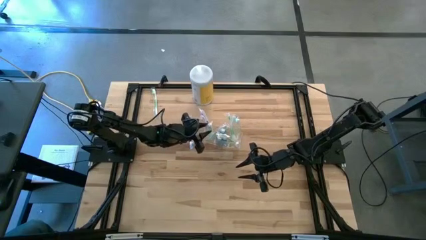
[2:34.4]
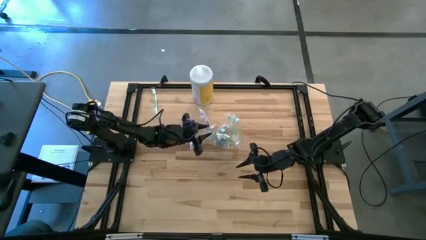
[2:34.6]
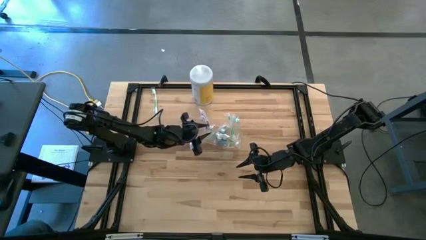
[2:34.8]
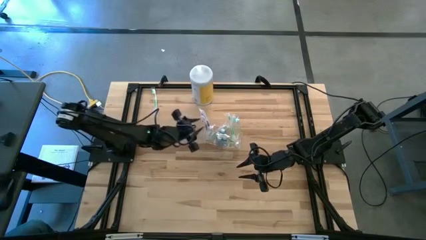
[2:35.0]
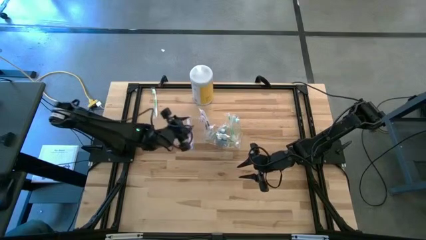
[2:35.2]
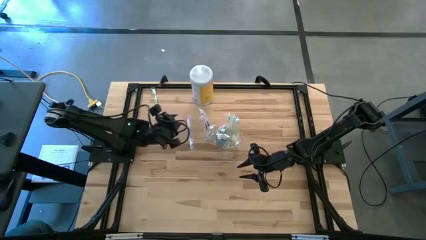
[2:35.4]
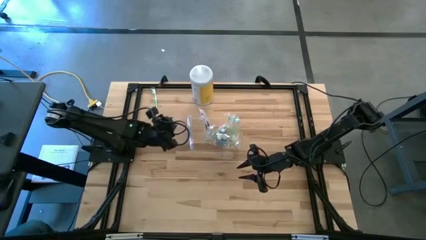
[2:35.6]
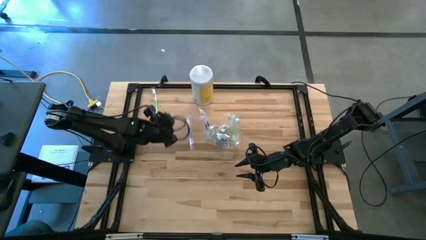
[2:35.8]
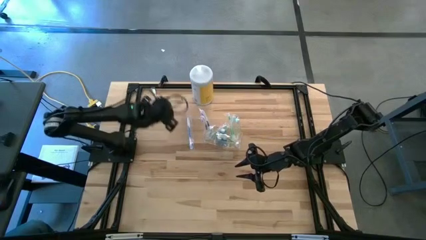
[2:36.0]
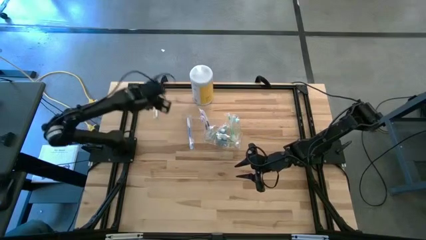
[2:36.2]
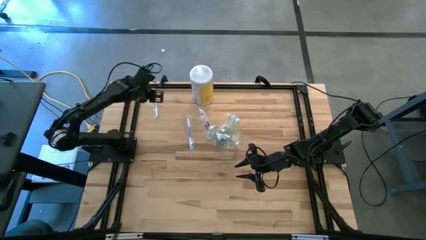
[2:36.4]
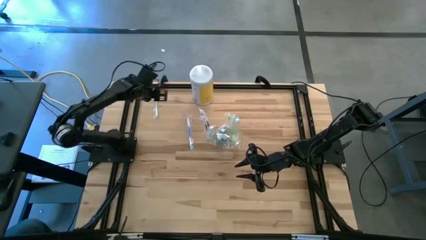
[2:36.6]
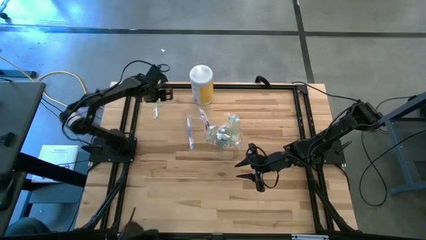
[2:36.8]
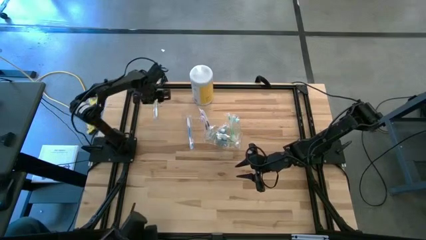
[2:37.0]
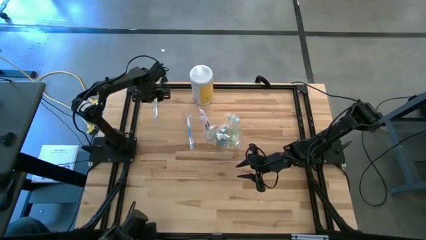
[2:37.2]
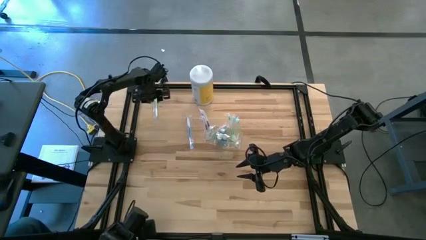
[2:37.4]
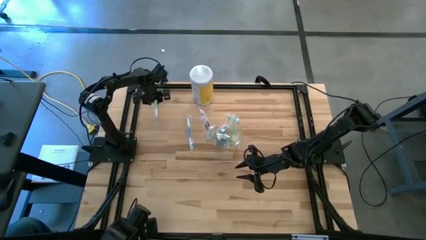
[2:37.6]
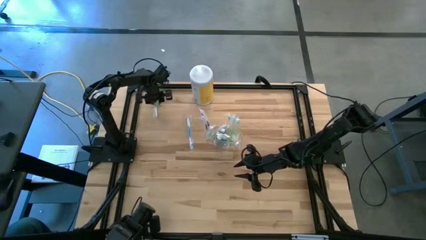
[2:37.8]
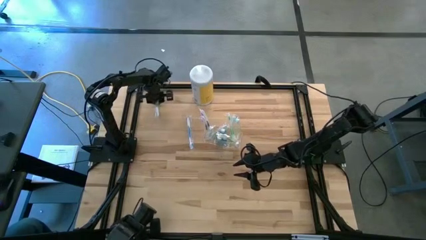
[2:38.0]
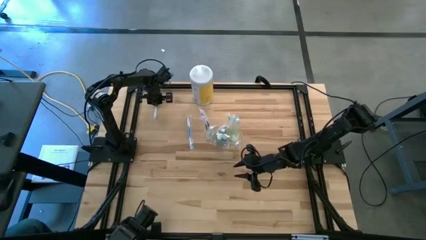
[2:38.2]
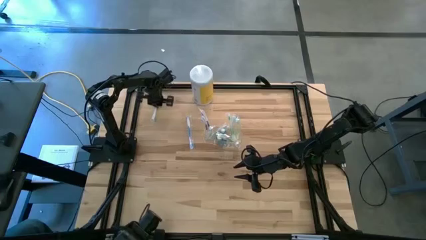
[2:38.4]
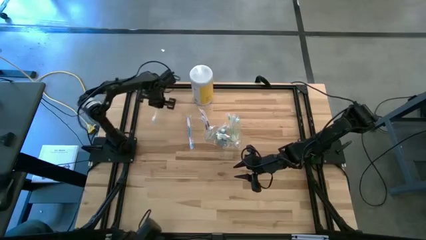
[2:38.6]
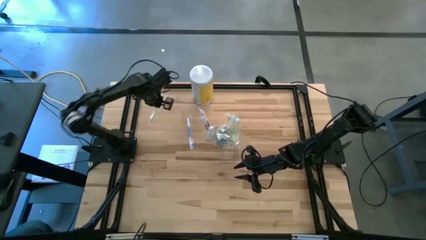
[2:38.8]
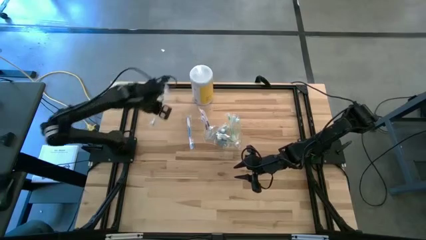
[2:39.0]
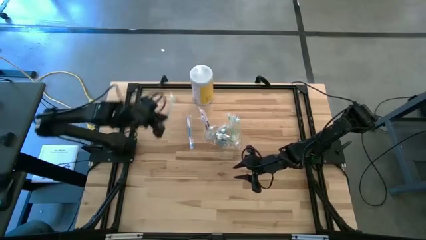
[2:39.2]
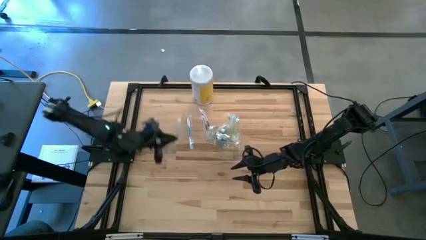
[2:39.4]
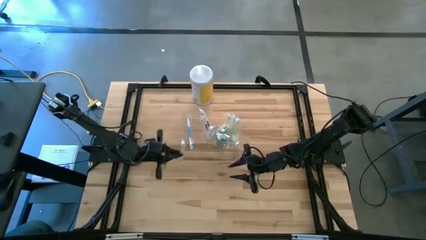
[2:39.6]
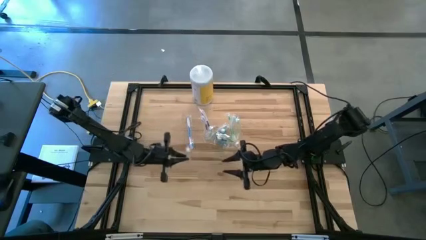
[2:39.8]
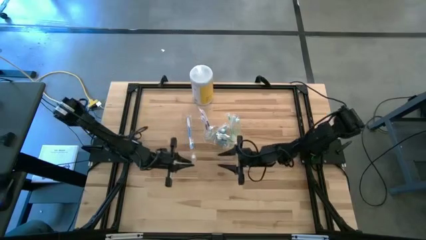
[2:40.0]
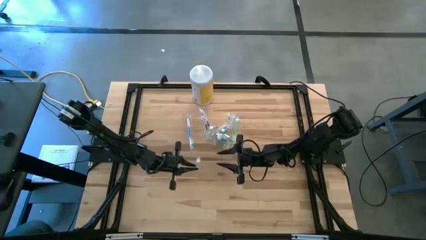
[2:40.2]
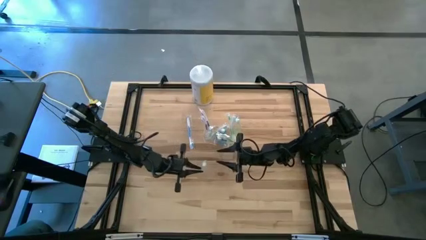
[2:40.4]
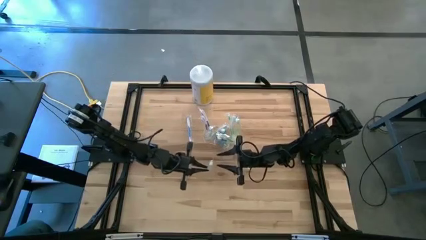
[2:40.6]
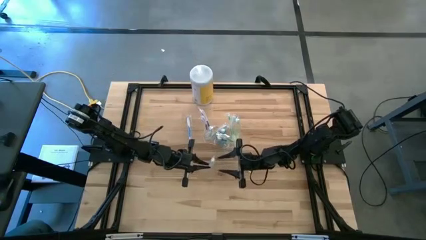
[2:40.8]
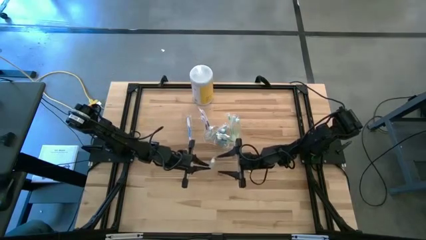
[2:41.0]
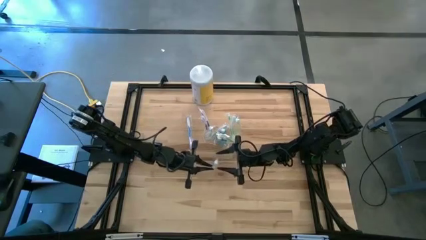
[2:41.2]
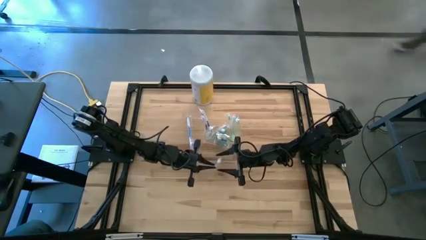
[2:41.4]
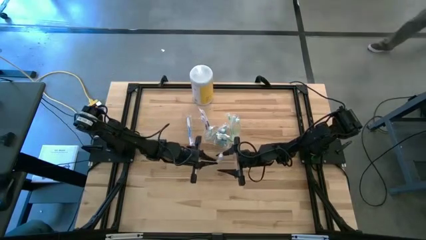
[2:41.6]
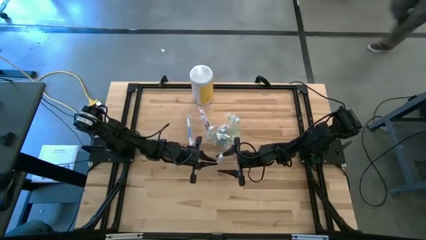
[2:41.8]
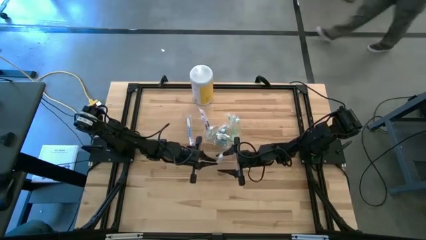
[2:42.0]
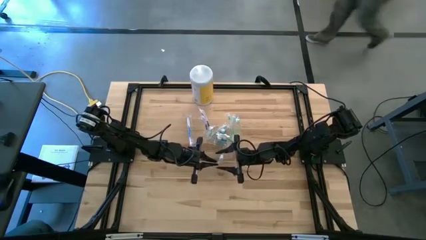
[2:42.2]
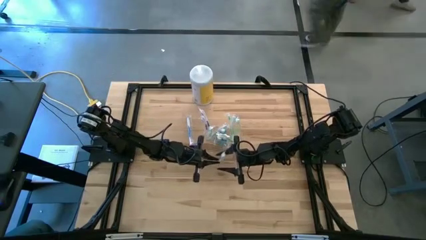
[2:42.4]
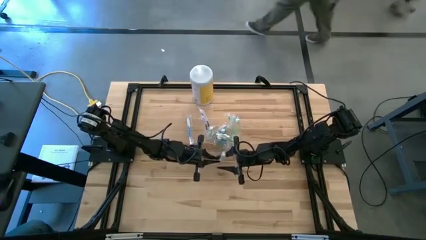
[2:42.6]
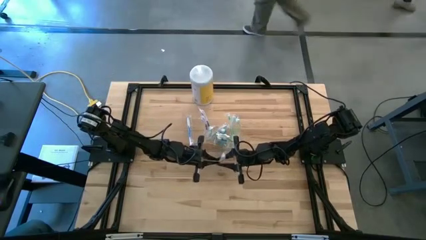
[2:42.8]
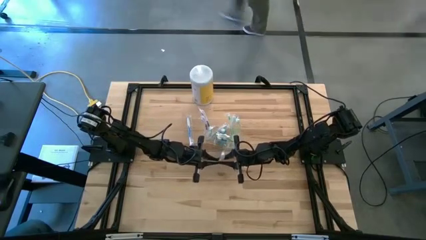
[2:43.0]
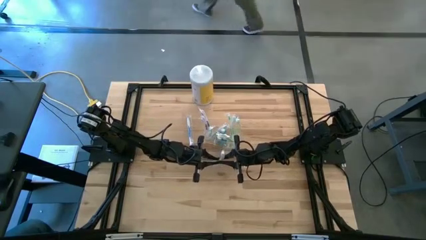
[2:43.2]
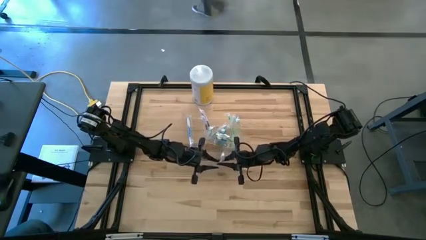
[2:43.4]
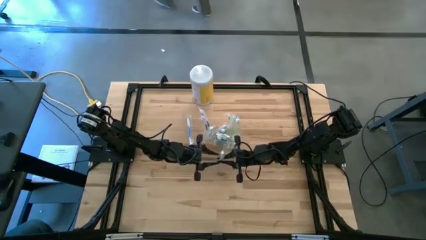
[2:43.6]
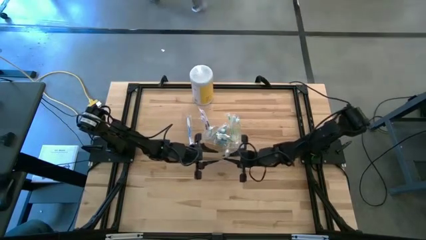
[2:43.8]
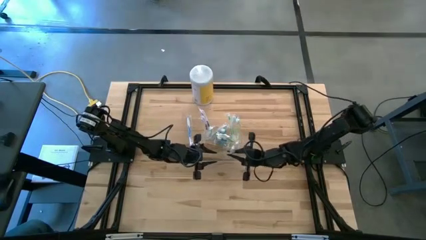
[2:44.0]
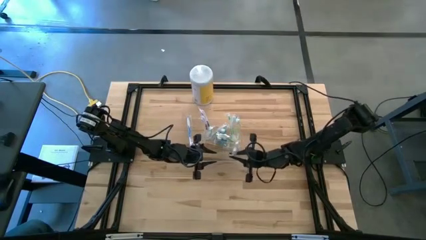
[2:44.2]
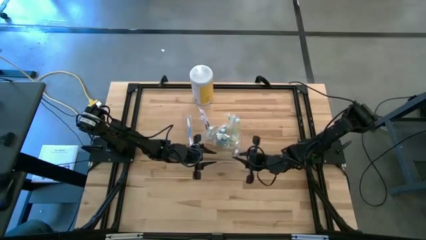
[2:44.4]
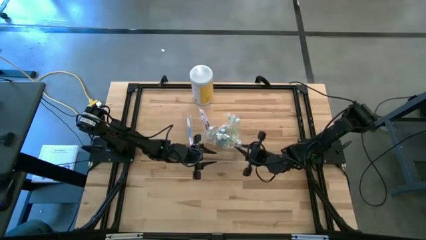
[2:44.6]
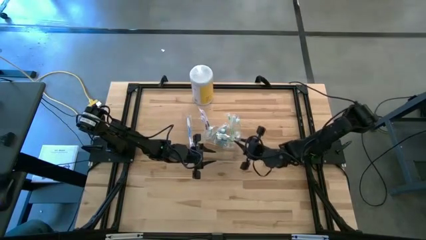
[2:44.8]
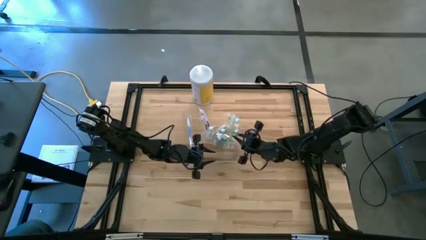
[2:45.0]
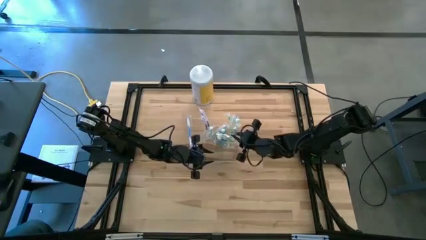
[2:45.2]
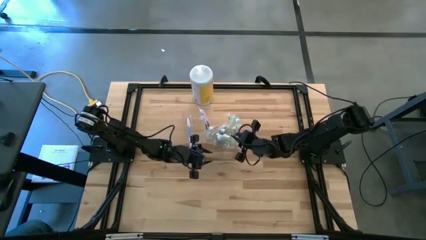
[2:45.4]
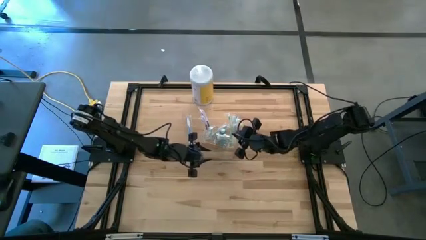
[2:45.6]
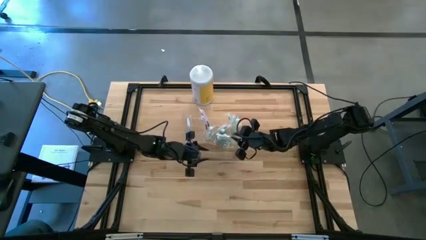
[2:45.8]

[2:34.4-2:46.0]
Task: Pick & Place toothbrushing station
Put the green toothbrush into the right section of the transparent organizer
